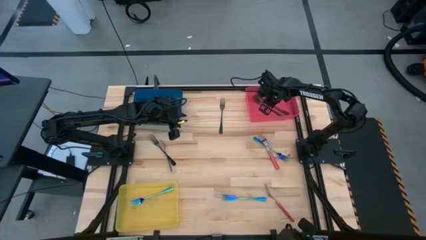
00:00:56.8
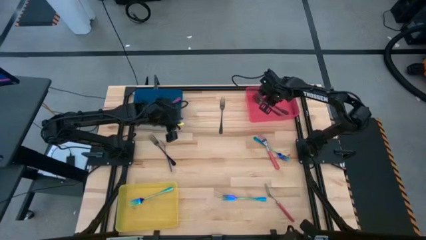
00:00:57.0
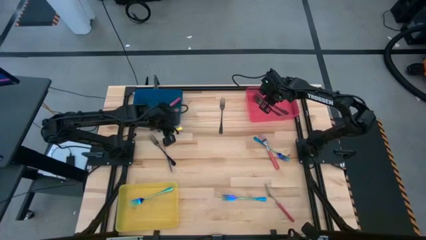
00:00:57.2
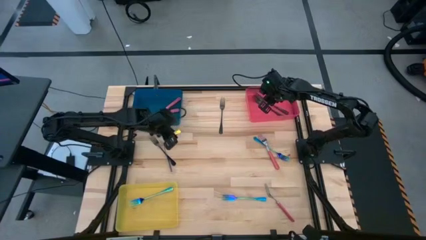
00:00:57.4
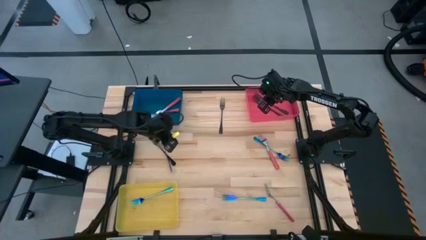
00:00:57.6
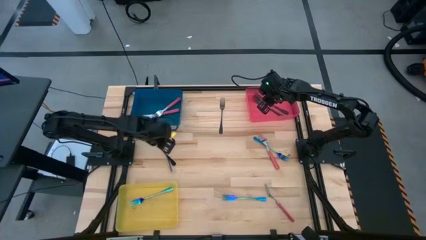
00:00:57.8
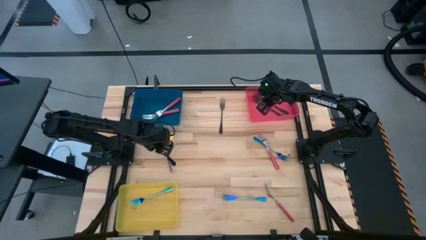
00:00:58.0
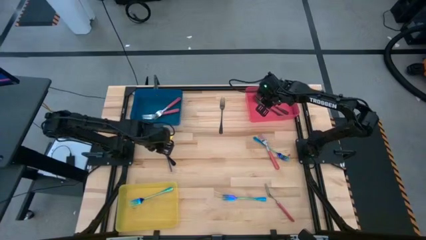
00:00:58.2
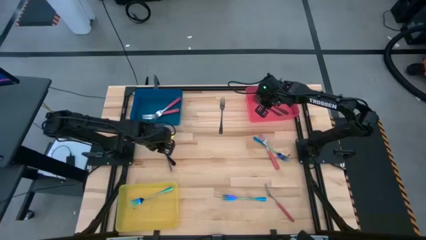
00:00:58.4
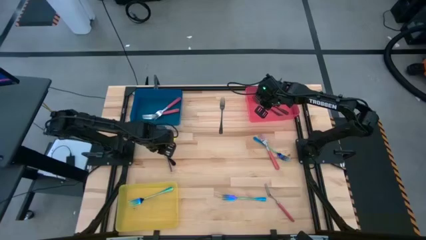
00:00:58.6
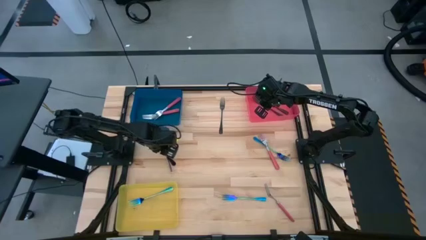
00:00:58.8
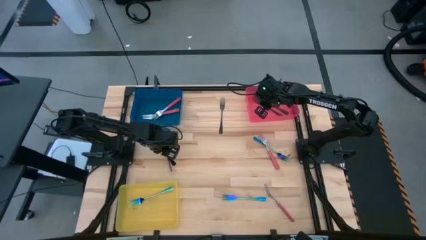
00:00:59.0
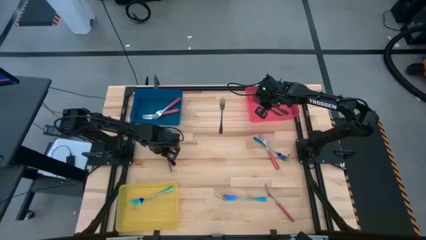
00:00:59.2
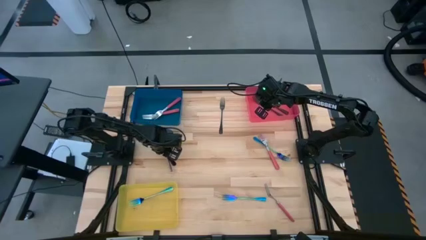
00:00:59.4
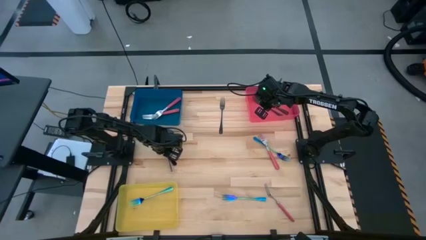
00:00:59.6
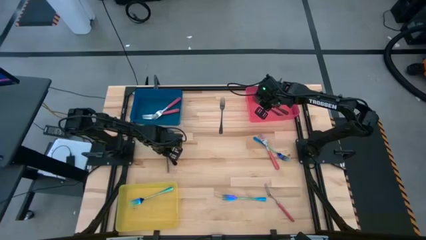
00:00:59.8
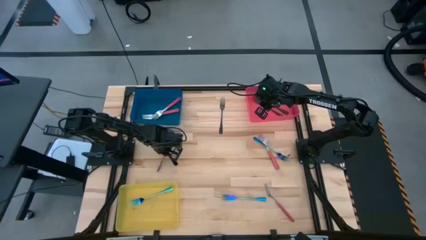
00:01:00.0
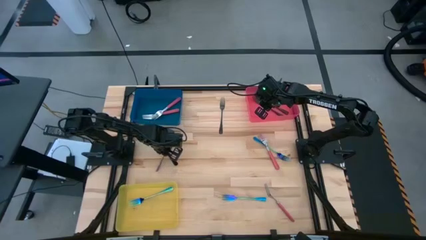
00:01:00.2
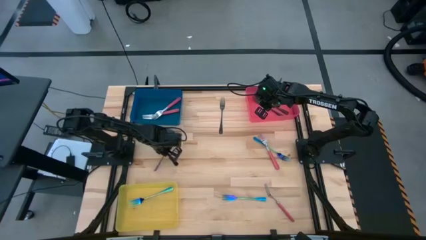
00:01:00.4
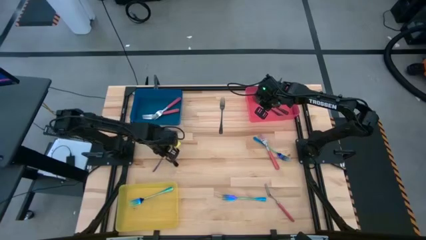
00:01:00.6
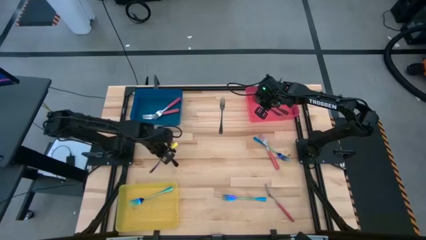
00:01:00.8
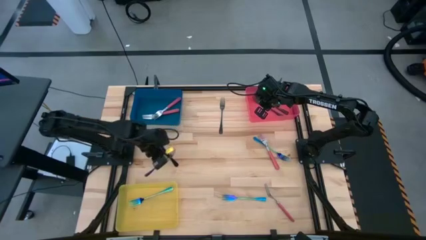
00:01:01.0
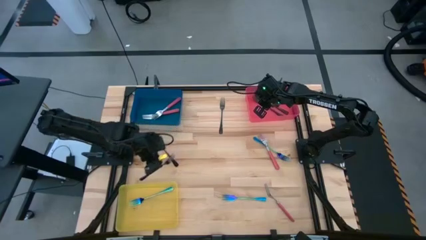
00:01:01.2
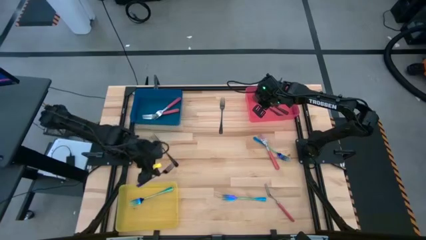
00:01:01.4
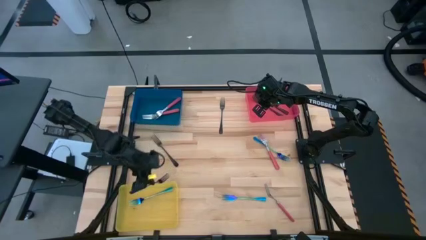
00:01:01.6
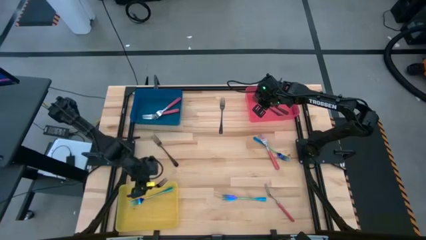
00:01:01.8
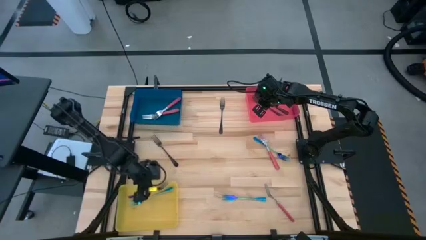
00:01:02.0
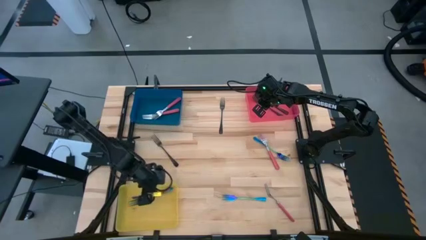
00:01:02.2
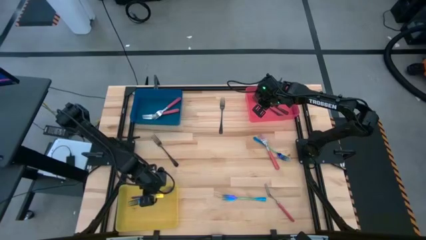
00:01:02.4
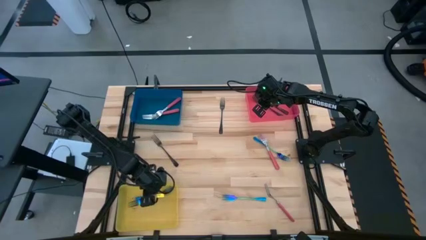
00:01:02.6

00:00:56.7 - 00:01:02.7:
Task: Sort silverware by color (type)
Put the blue fork into the yellow bin

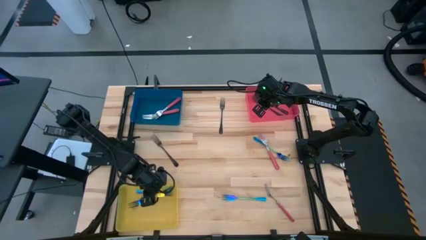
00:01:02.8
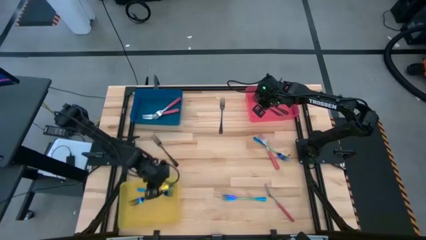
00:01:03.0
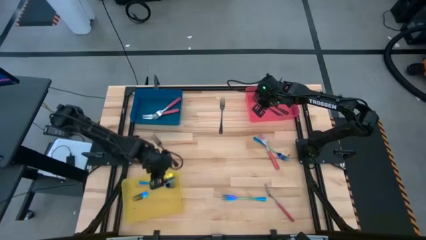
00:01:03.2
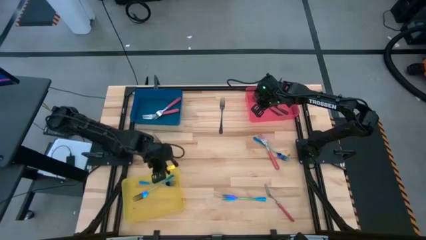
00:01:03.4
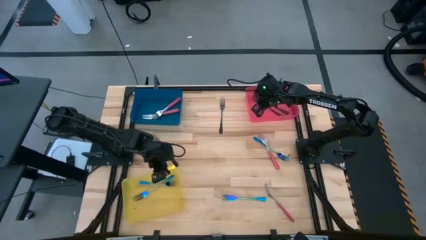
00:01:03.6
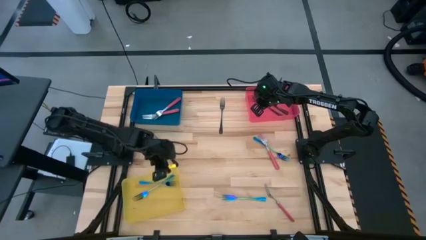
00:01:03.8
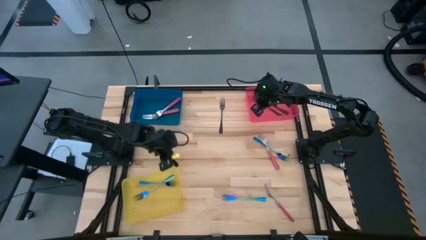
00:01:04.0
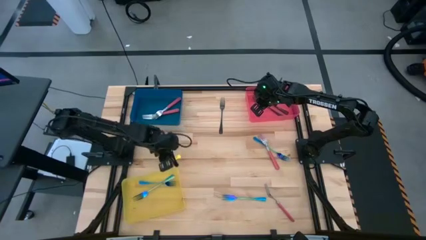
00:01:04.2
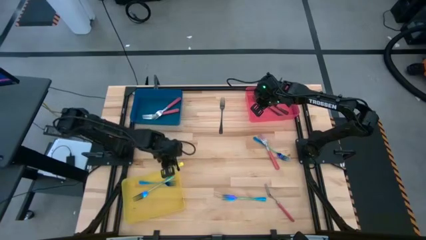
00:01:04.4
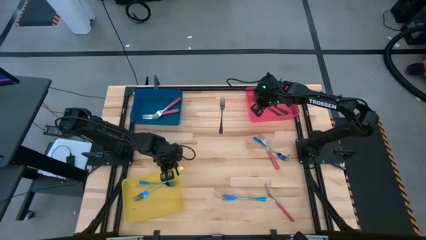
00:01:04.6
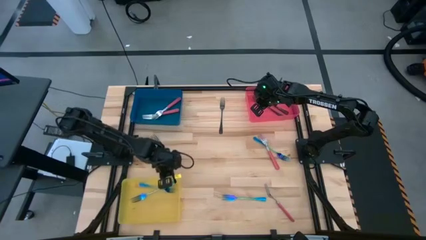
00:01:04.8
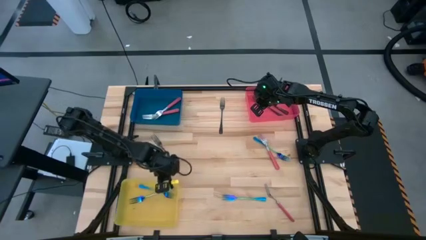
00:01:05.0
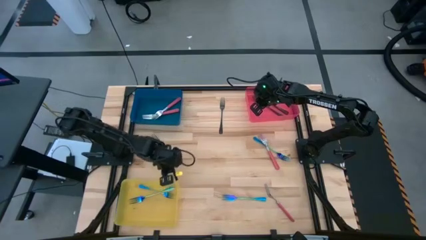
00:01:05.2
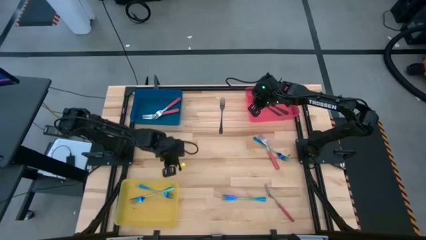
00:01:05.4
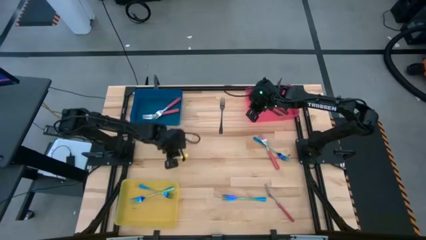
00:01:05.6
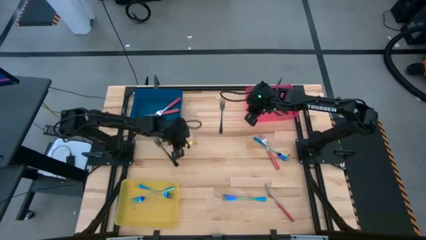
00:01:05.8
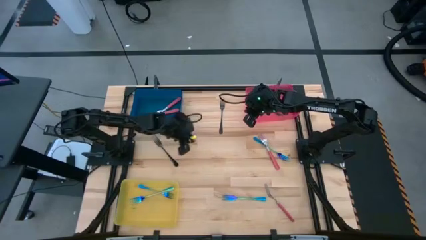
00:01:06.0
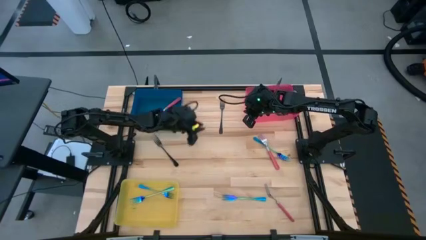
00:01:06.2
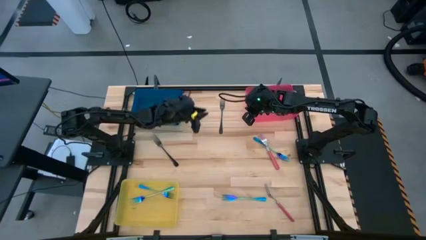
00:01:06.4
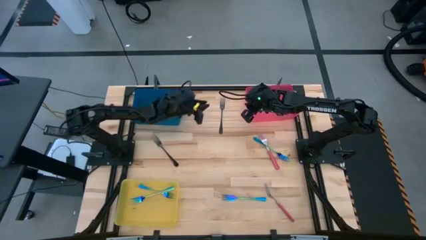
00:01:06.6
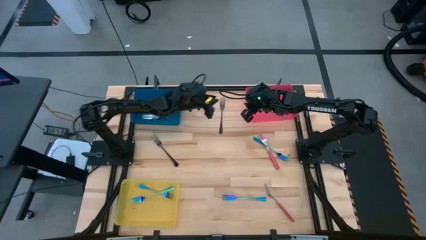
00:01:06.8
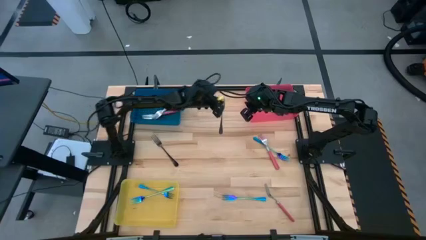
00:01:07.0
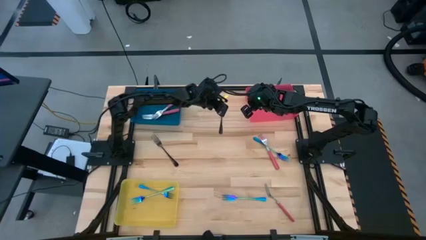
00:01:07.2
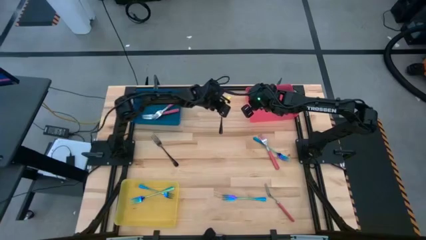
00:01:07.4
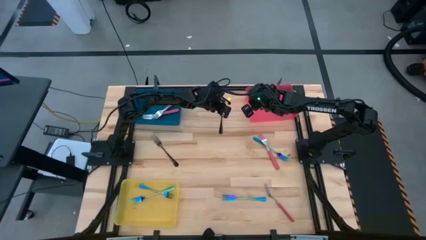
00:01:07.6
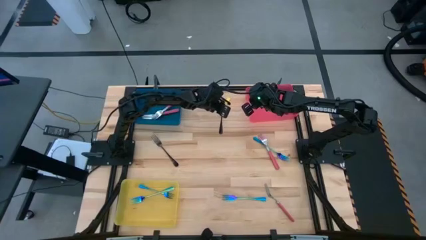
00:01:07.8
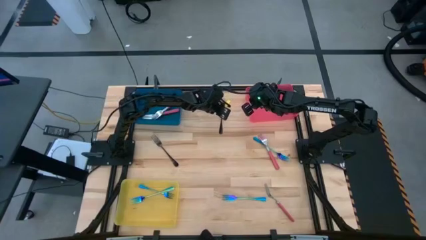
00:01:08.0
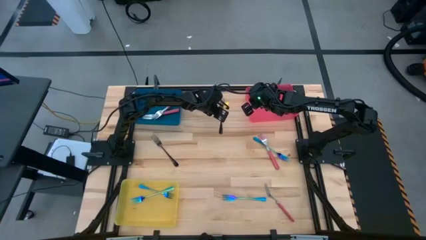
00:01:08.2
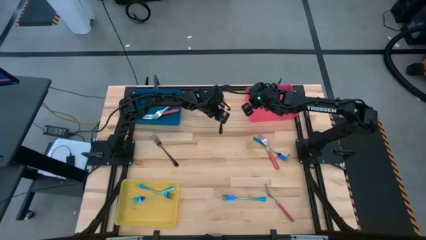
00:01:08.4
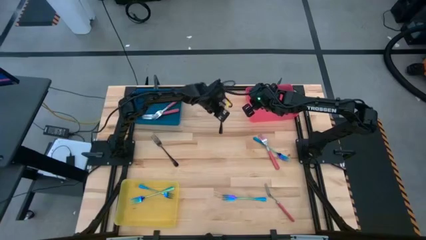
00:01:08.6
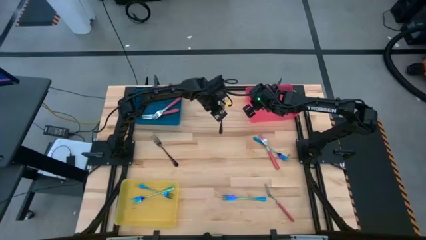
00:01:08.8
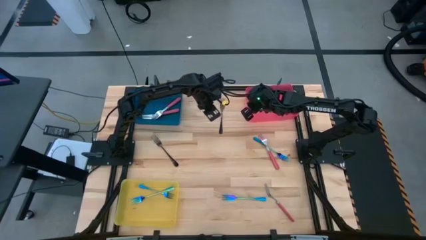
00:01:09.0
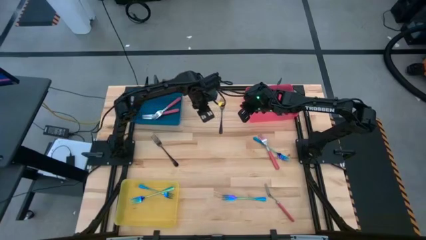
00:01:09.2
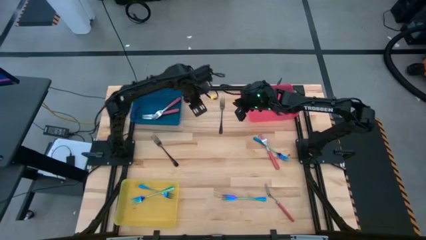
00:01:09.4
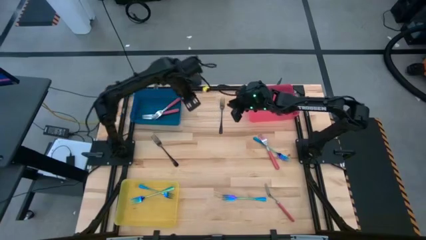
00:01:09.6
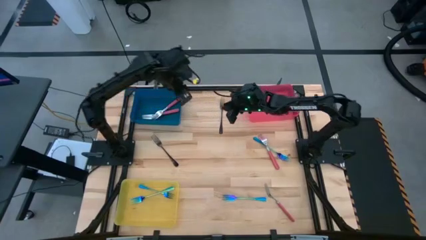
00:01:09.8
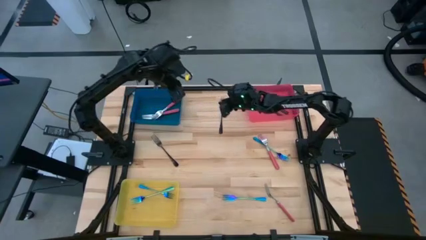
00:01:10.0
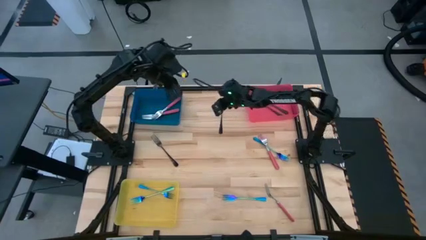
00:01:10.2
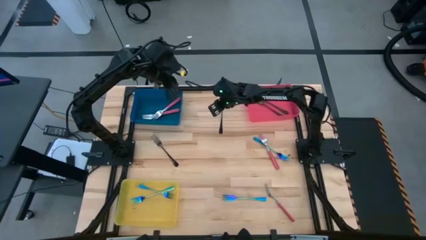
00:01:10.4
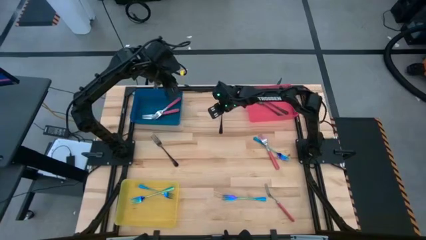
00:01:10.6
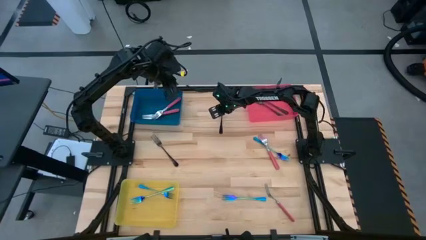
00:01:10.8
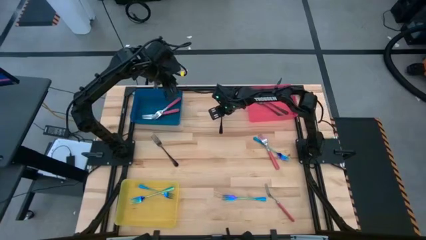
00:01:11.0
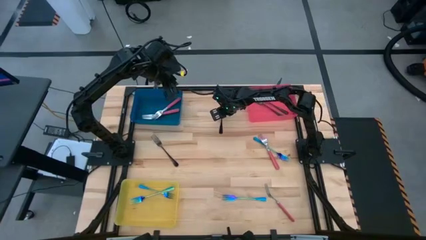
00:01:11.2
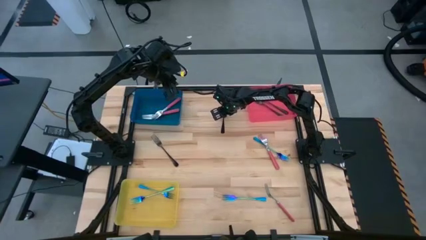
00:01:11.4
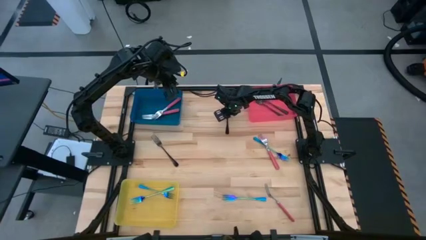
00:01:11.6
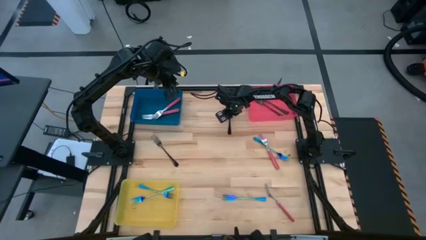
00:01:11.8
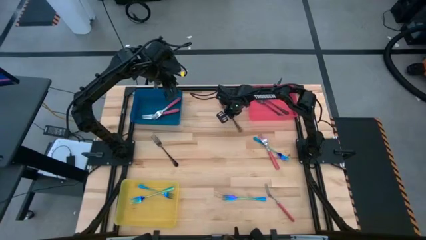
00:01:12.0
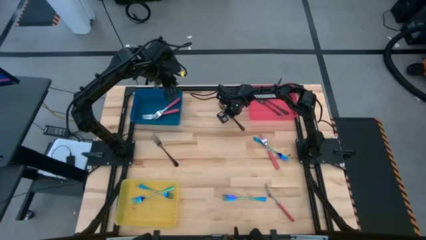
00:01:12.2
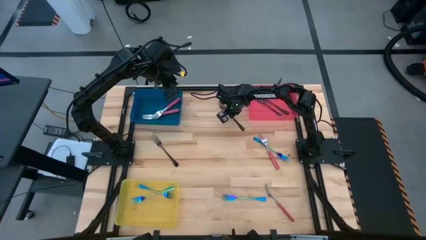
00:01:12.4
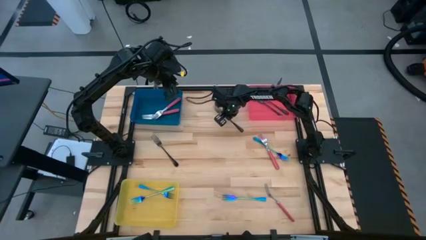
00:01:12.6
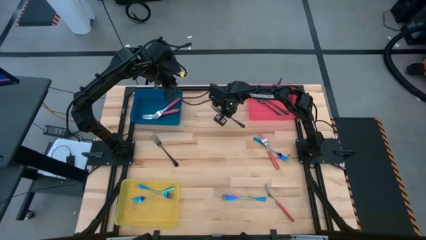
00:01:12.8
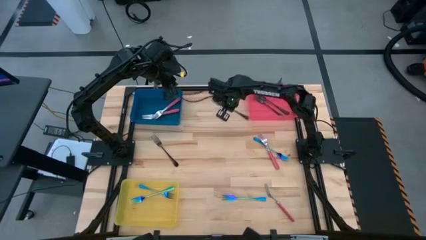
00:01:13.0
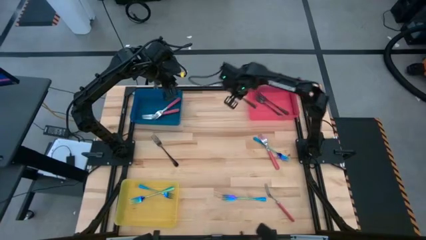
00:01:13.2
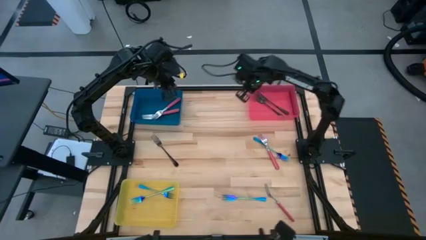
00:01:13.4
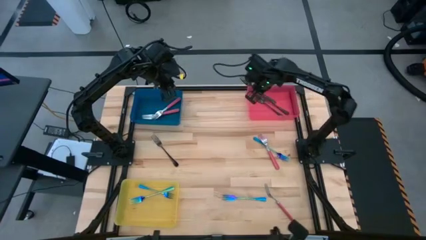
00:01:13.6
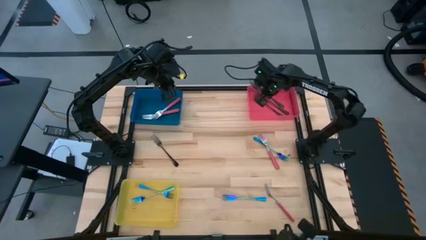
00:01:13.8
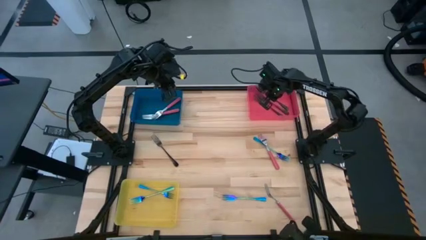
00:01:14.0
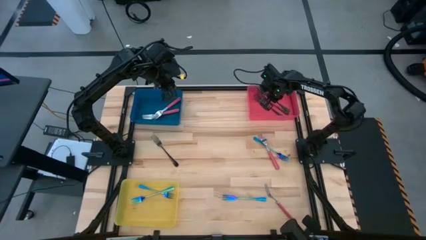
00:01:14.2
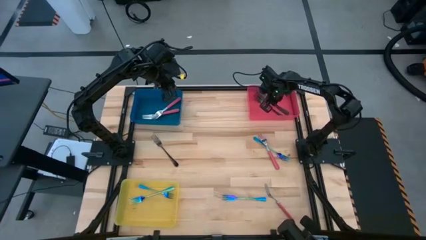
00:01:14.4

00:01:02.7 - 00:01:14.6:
Put the black fork into the red bin
